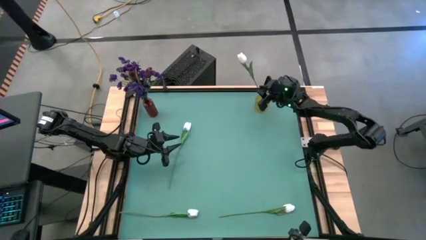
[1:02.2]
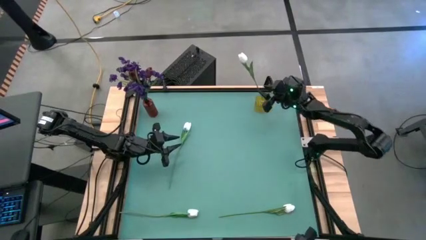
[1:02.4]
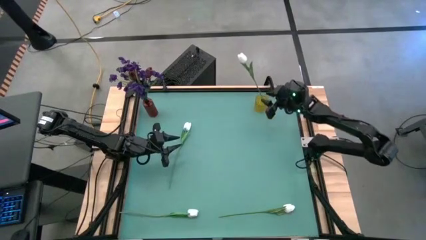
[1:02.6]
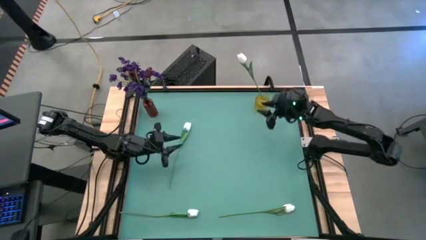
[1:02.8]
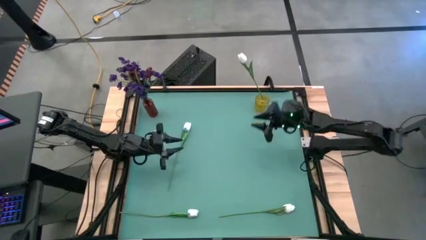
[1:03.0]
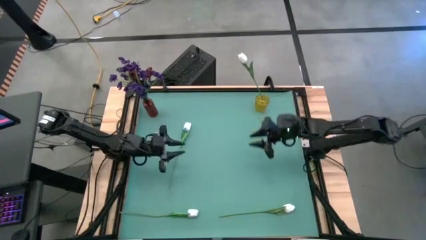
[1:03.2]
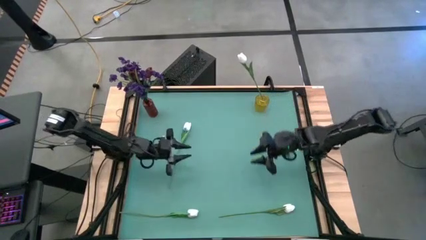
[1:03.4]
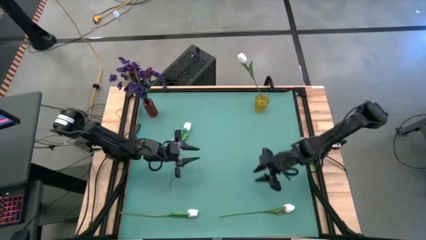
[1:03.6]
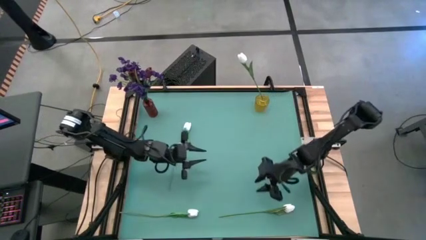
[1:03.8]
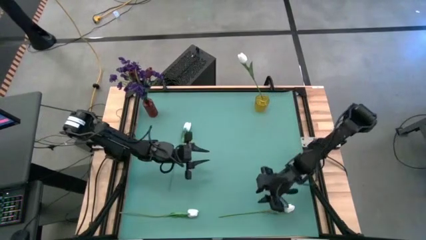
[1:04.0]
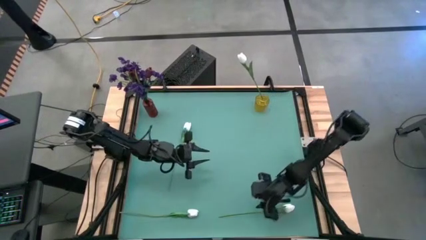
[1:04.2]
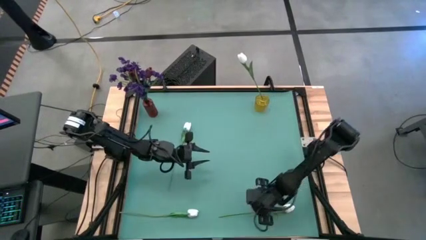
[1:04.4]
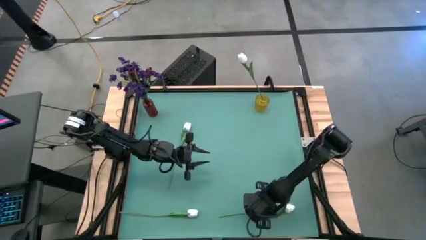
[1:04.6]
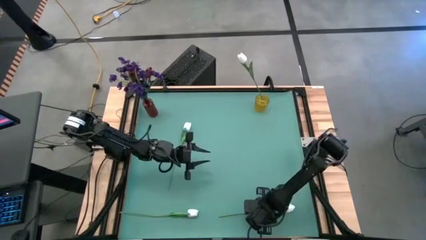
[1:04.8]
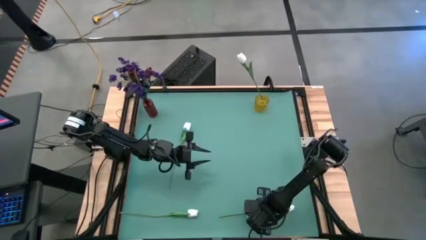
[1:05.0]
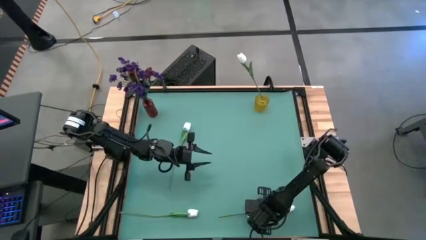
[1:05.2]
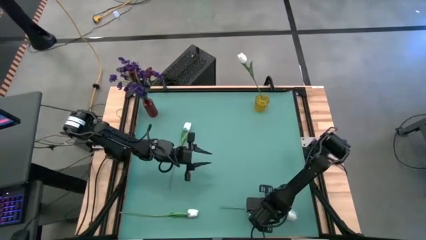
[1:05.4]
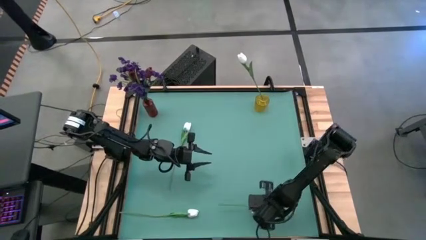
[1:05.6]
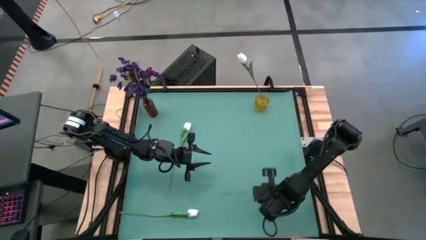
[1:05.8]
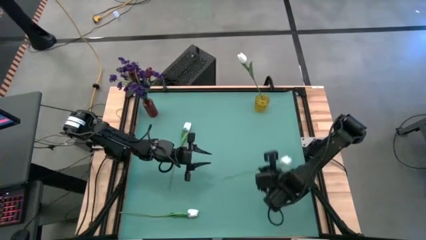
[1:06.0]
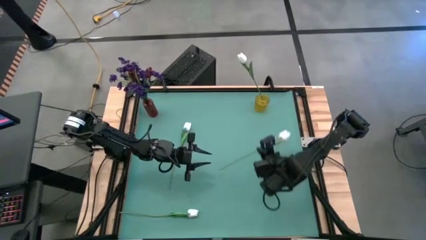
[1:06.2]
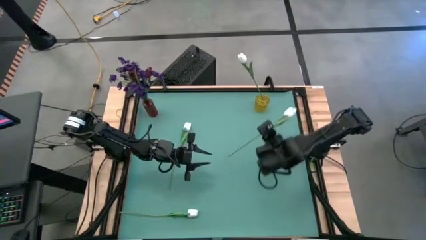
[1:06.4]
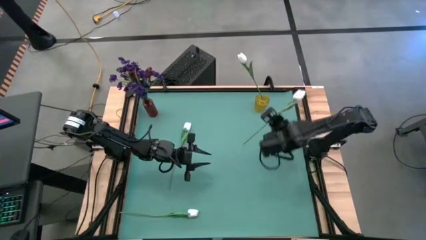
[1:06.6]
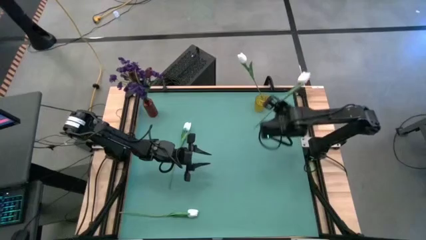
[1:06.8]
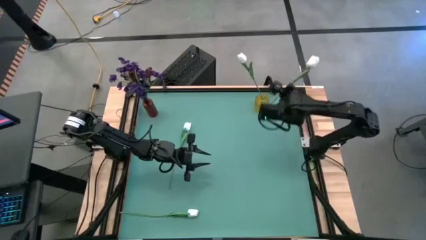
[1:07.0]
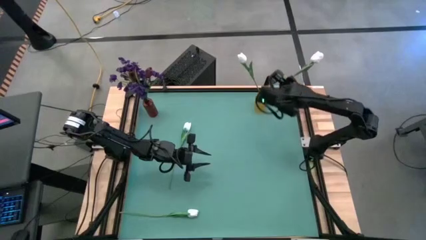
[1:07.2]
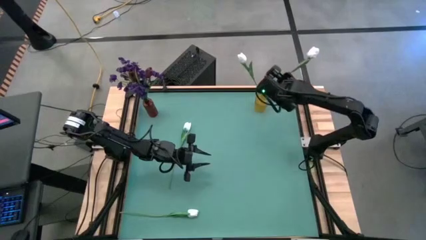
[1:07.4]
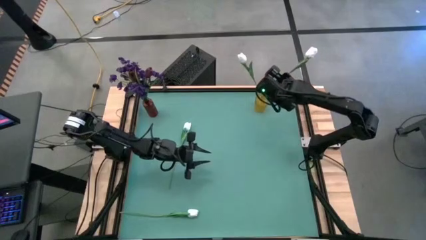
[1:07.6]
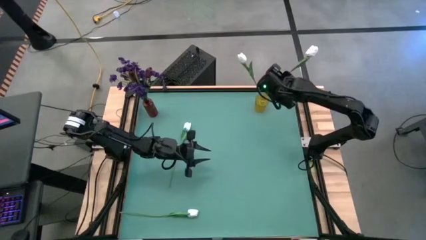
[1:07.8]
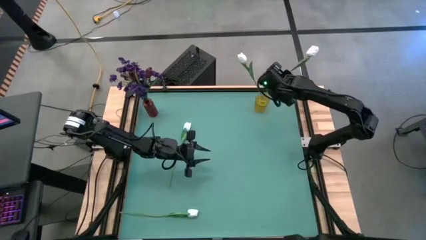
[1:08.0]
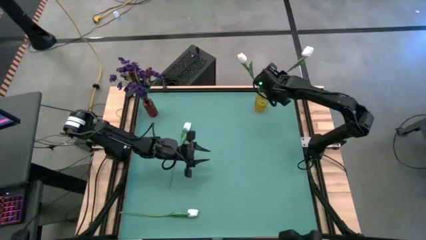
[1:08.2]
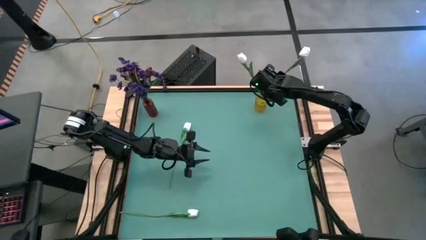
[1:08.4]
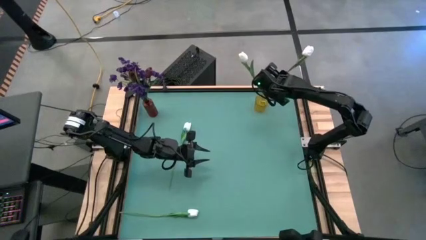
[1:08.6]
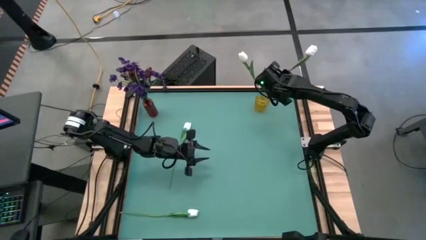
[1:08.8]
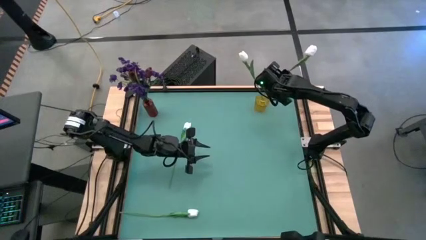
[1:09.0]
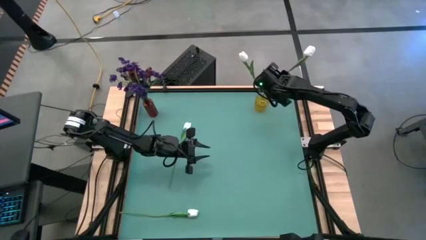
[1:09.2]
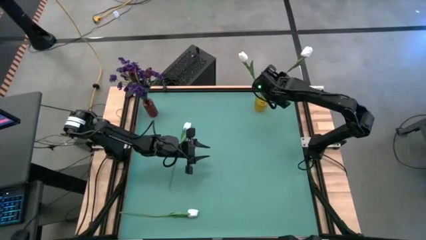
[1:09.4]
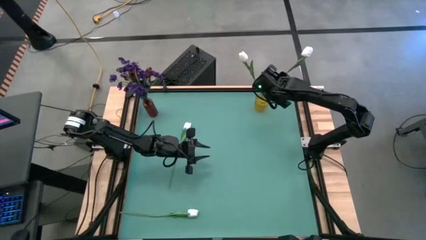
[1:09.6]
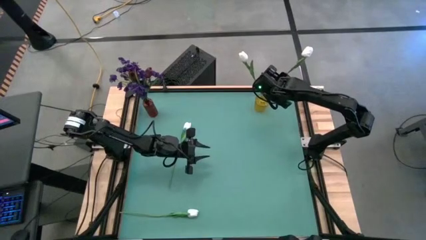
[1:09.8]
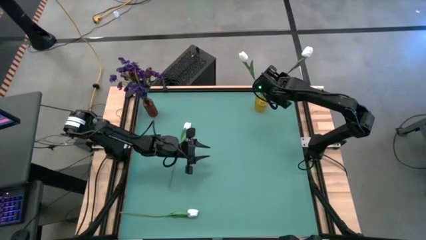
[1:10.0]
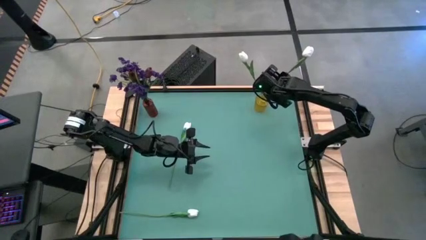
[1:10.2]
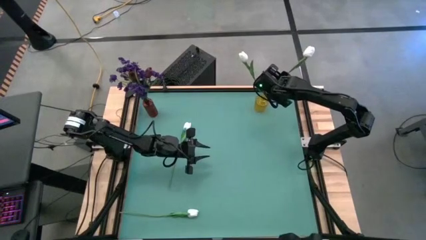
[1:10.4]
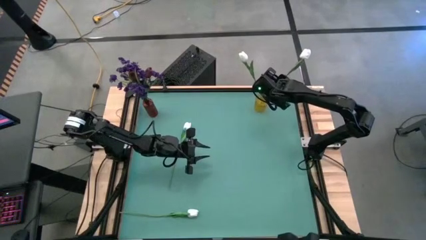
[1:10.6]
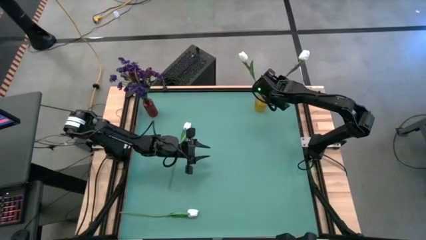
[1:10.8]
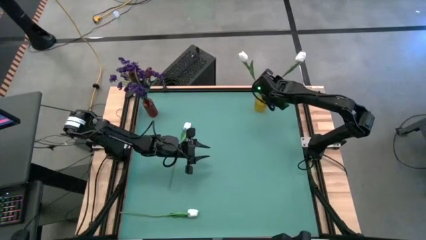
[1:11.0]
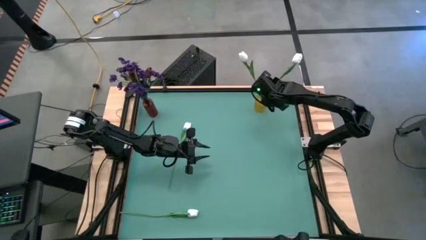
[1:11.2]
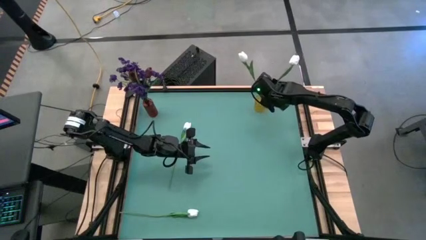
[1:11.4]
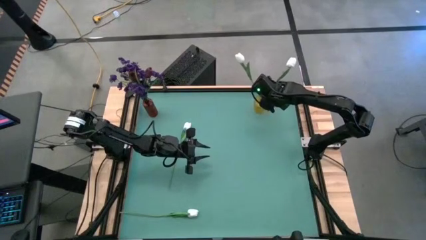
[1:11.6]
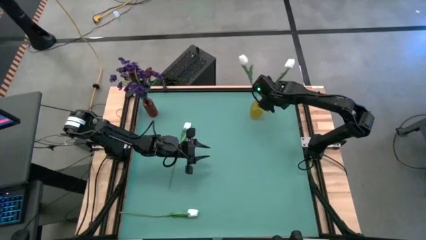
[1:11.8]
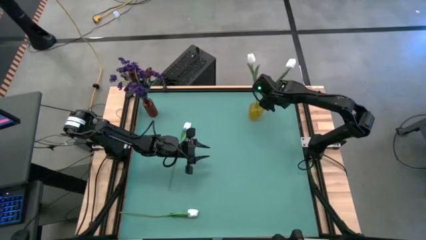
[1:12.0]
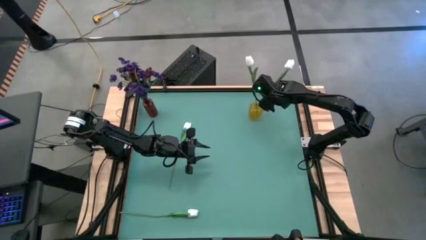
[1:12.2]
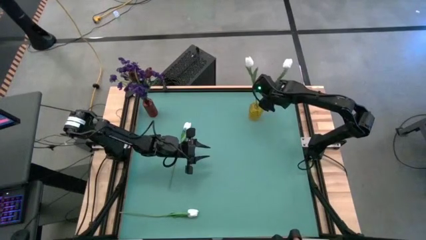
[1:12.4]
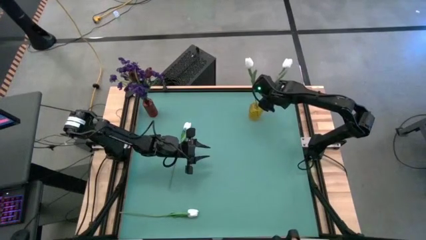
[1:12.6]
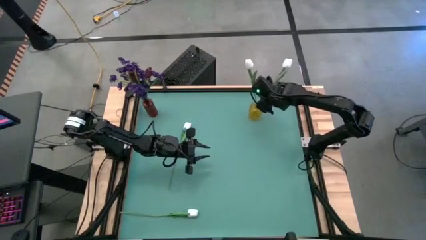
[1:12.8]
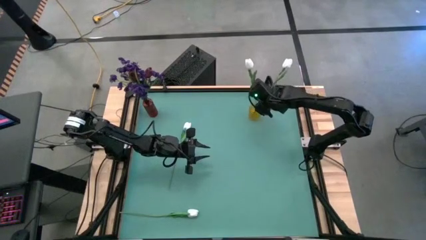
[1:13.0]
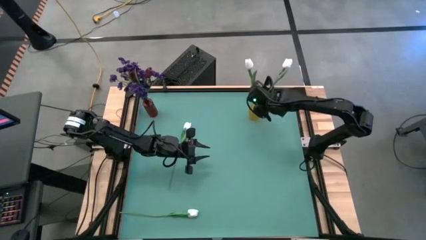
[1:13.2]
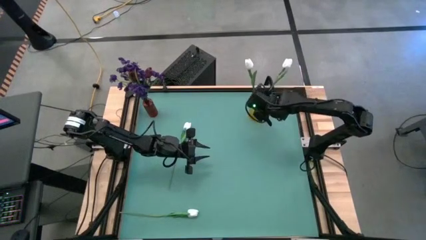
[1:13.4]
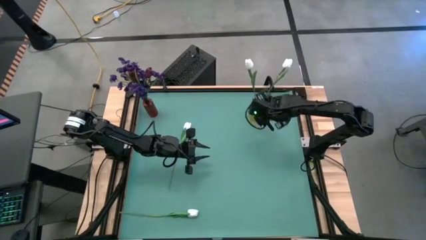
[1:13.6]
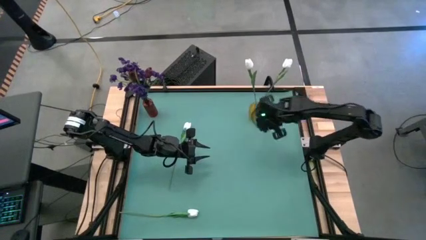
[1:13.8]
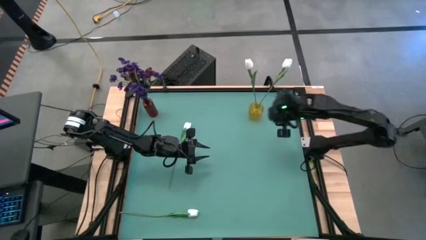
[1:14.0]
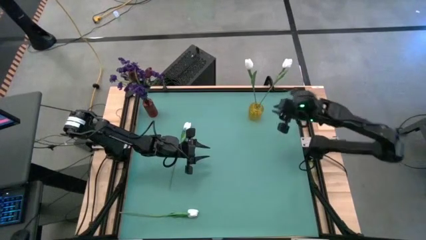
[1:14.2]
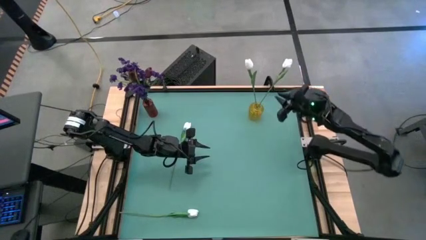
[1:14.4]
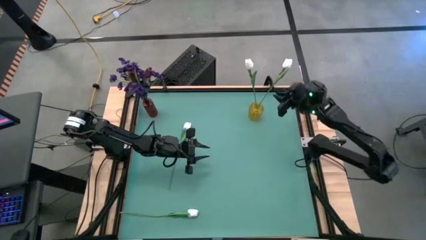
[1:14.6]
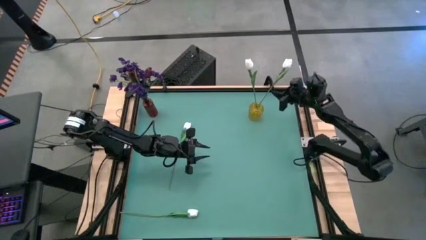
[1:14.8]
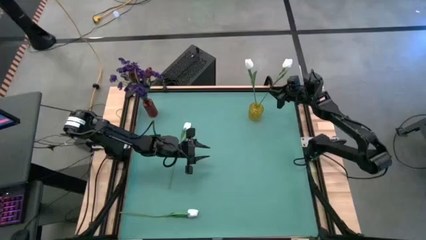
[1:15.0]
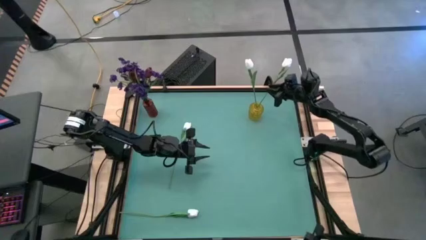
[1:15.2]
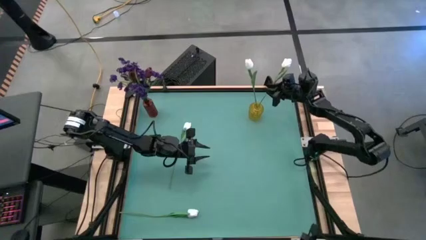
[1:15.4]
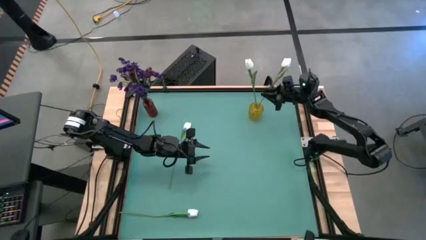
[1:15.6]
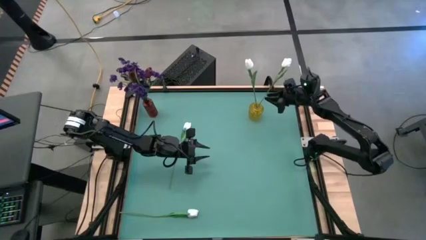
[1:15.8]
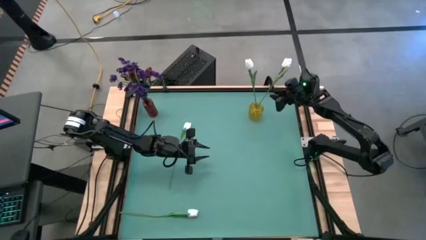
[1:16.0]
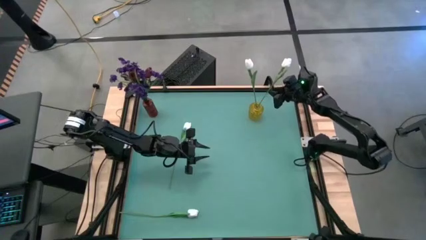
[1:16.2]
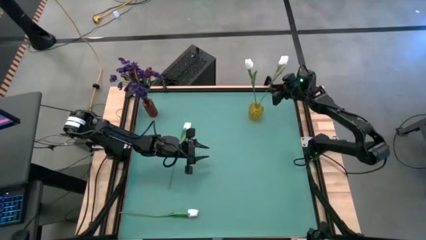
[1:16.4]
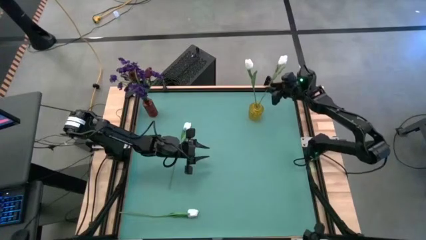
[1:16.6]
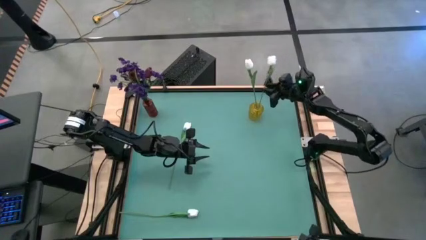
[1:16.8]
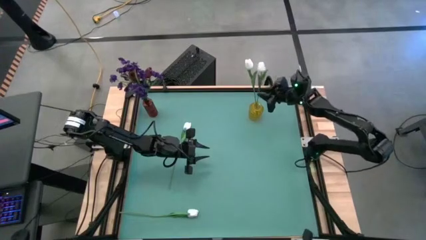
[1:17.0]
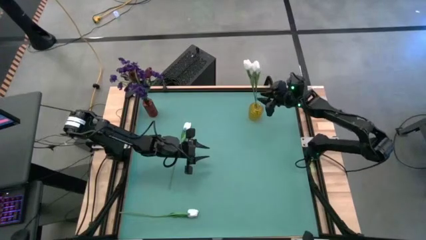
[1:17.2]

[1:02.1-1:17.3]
Task: Sort flowers into vase by color
Put the right white tulip into the yellow vase
